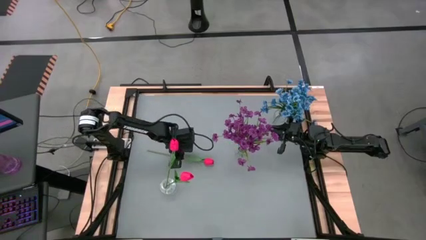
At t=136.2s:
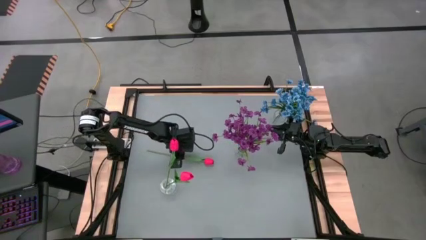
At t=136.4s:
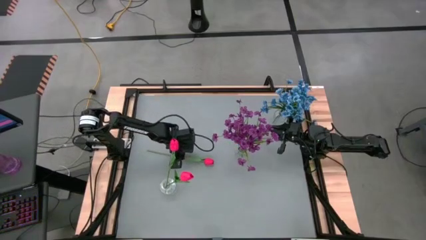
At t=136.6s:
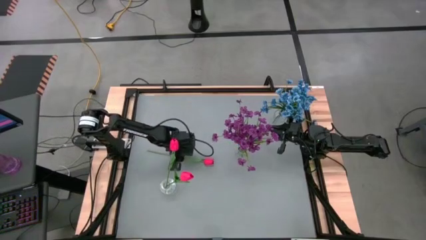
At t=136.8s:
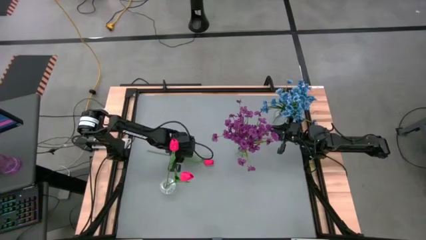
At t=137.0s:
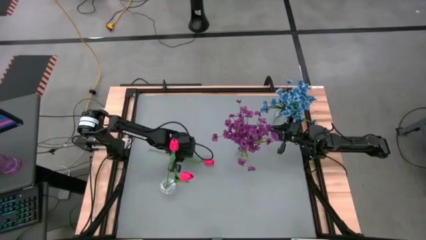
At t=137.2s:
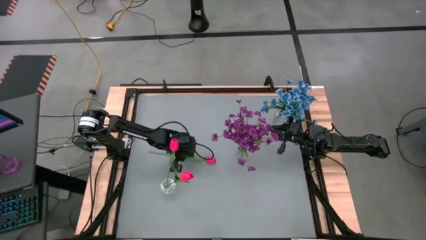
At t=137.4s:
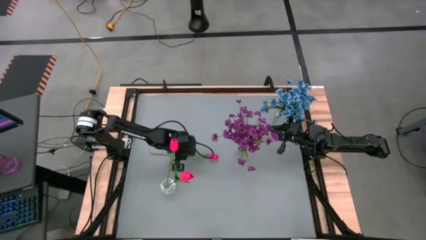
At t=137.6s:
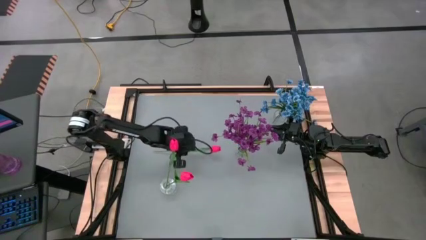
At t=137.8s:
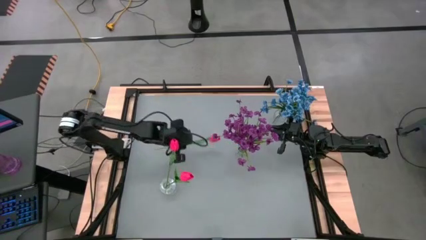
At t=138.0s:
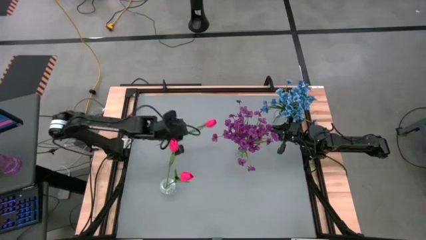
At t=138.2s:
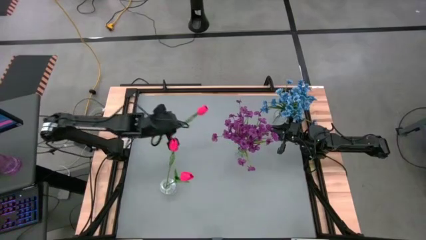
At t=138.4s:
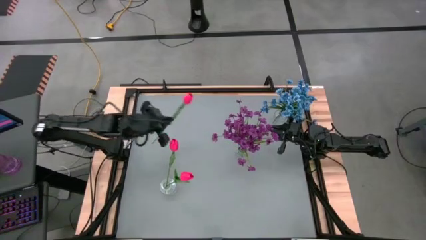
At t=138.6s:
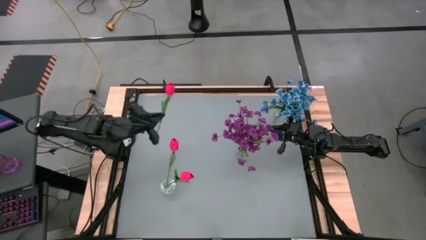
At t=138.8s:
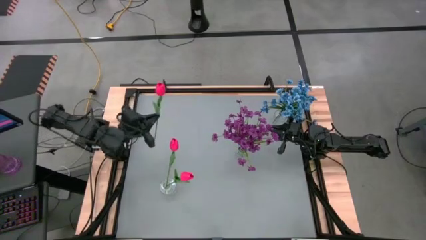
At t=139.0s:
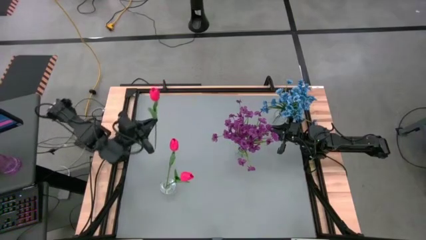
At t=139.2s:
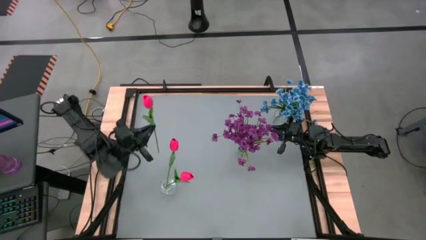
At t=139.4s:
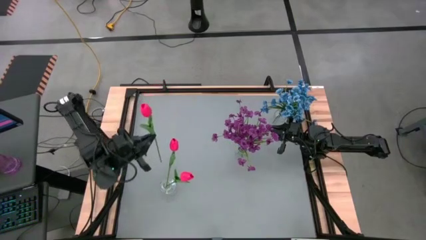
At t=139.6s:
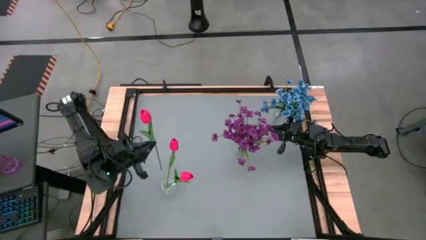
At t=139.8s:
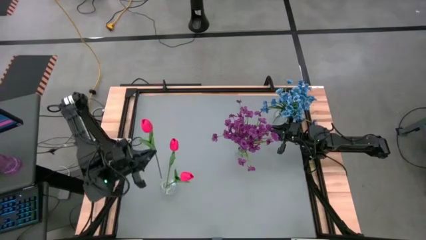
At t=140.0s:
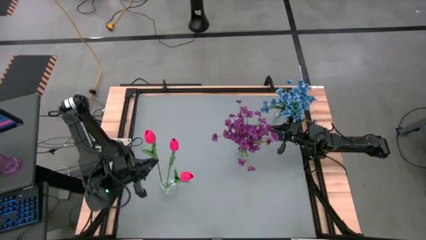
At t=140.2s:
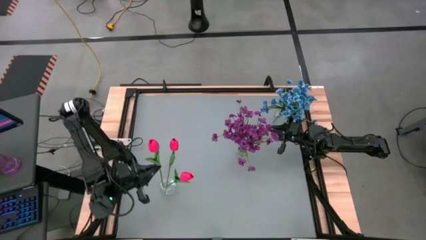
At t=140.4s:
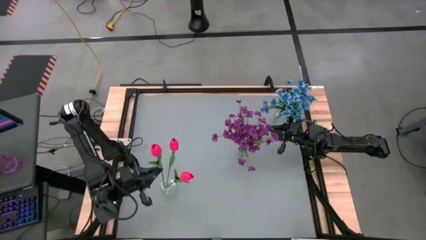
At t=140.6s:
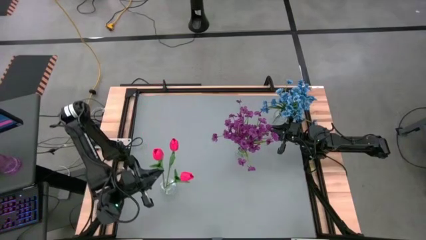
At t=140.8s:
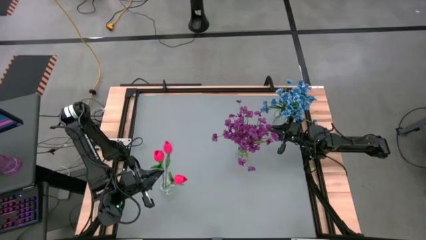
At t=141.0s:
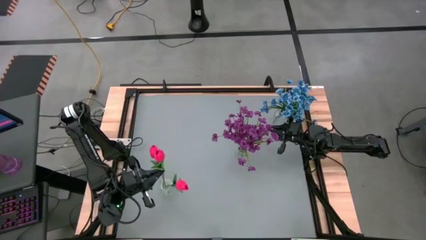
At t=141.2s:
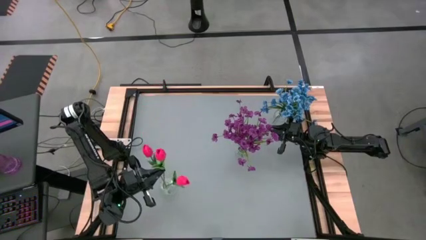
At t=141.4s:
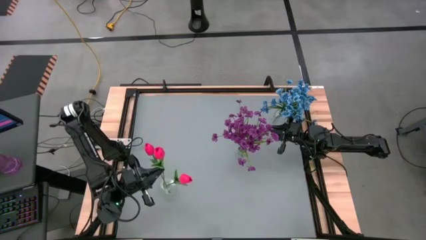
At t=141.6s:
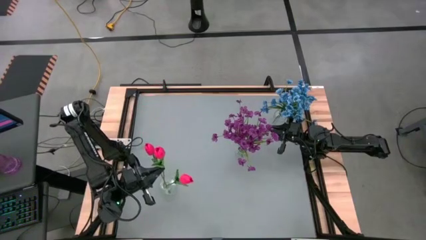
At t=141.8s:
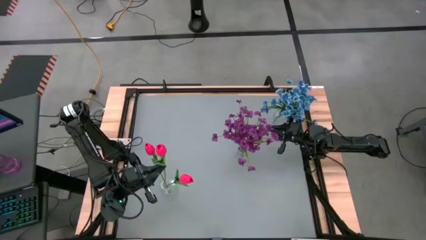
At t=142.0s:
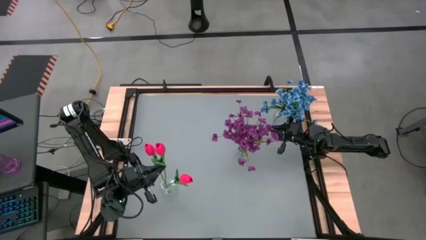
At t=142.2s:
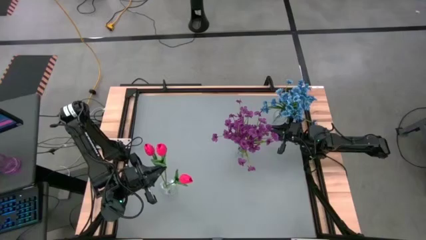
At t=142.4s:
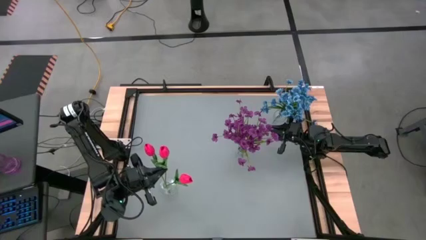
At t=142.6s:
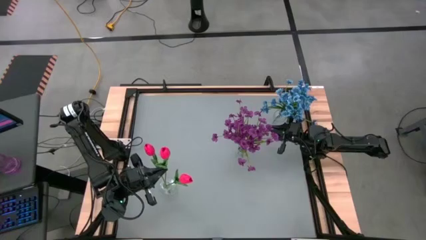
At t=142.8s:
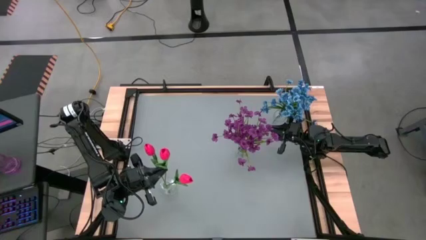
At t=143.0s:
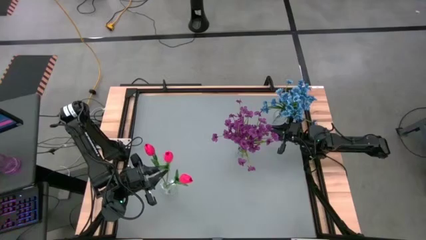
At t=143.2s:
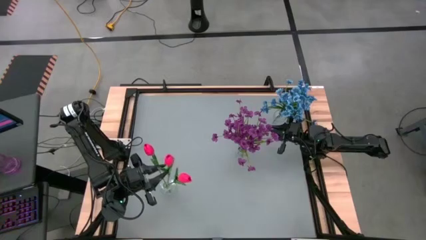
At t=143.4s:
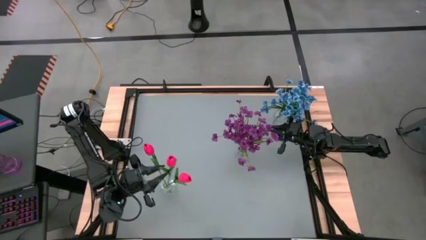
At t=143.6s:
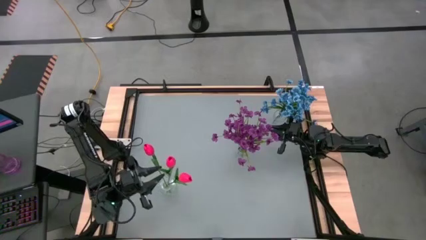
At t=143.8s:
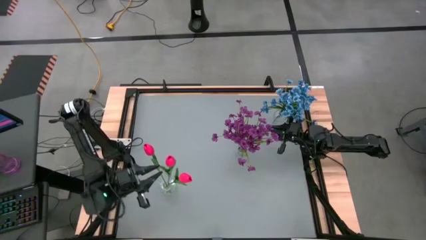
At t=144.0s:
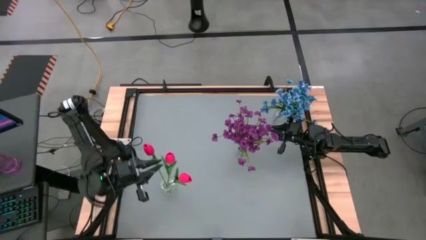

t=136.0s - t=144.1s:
Task: Sort flowers into vase by color
Put the pink tulip into the bottom transparent vase

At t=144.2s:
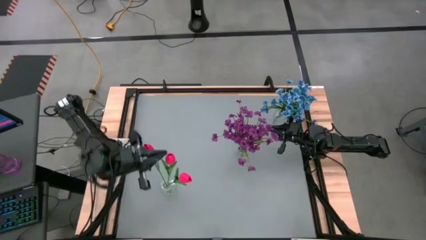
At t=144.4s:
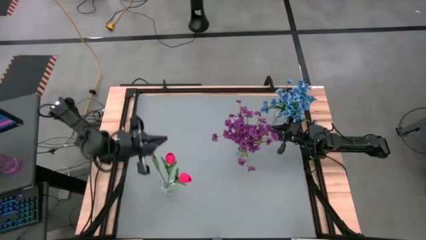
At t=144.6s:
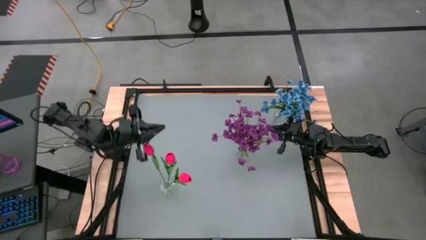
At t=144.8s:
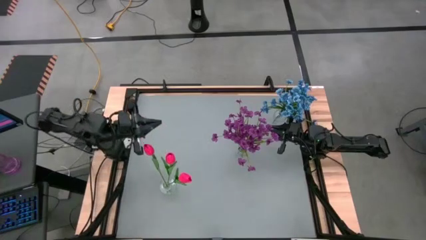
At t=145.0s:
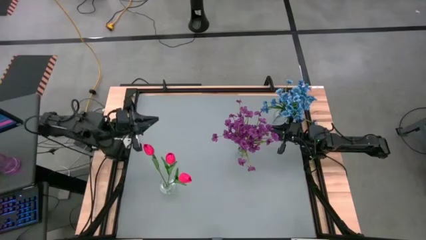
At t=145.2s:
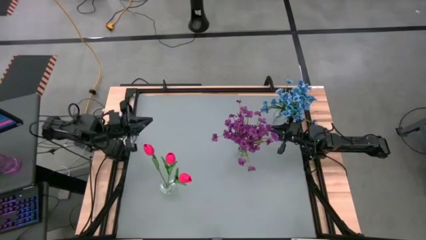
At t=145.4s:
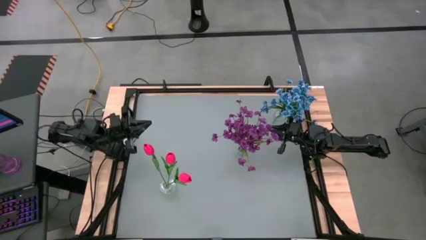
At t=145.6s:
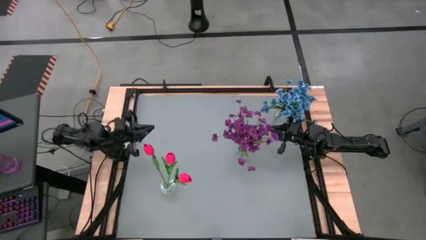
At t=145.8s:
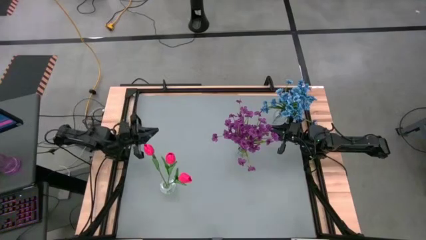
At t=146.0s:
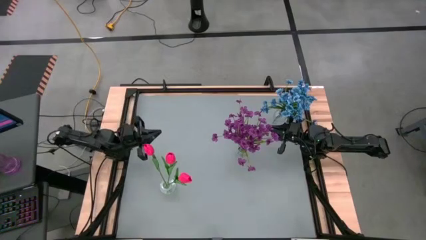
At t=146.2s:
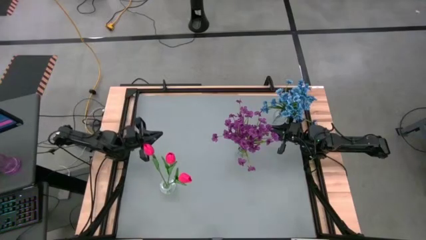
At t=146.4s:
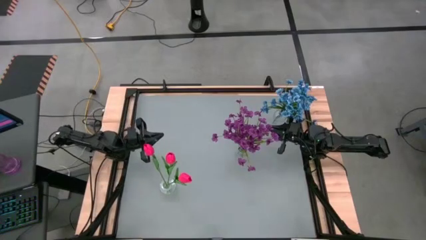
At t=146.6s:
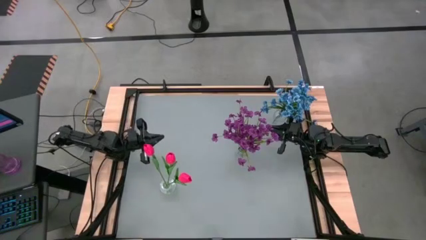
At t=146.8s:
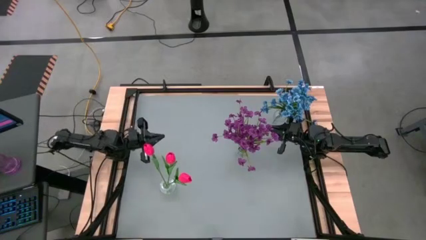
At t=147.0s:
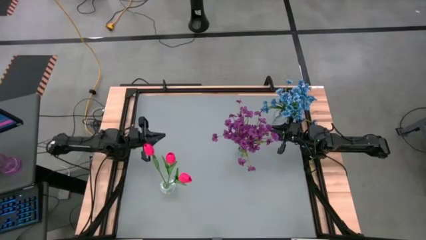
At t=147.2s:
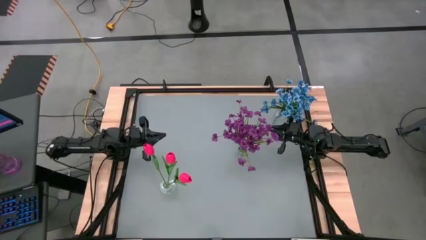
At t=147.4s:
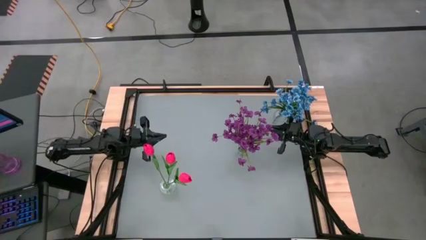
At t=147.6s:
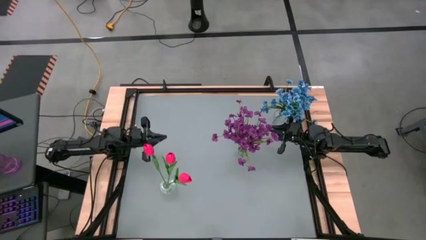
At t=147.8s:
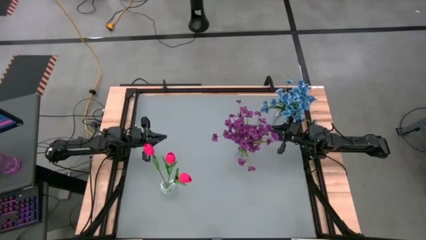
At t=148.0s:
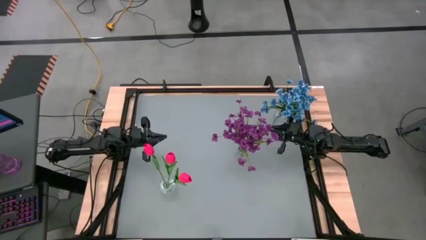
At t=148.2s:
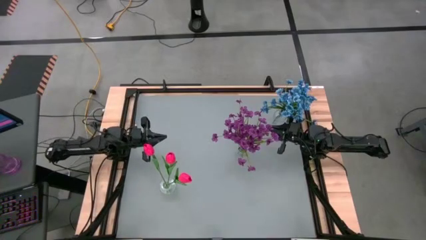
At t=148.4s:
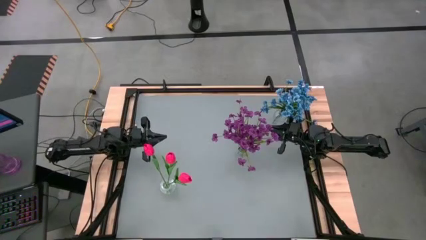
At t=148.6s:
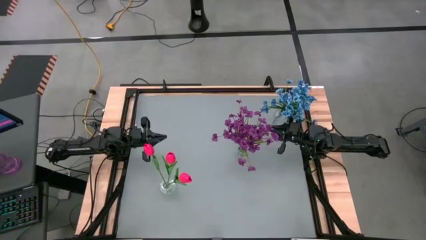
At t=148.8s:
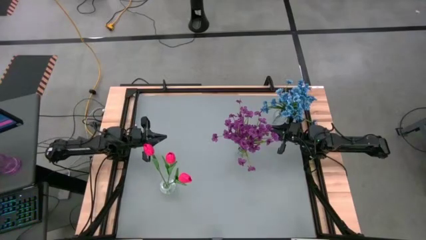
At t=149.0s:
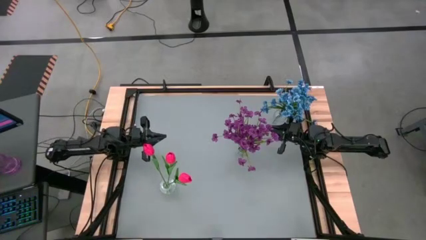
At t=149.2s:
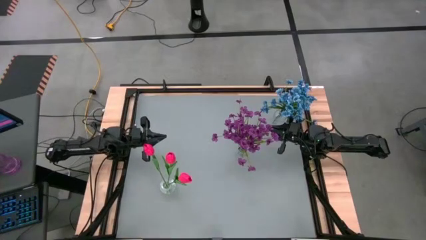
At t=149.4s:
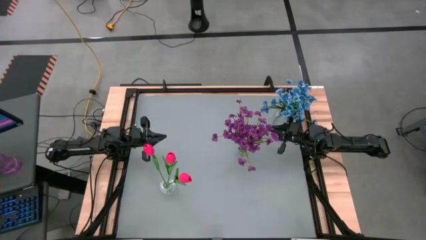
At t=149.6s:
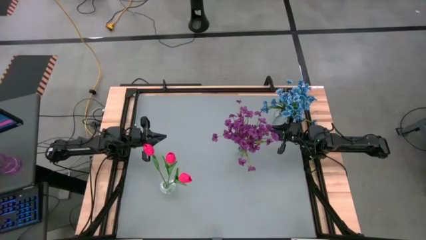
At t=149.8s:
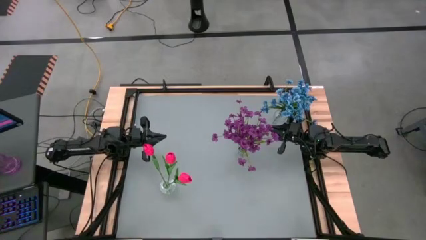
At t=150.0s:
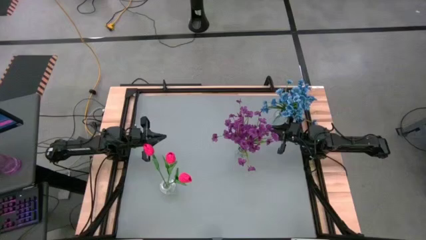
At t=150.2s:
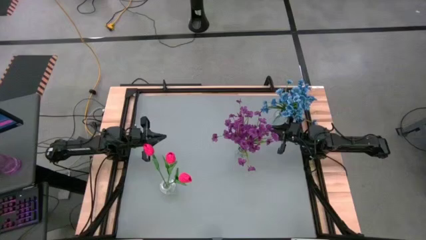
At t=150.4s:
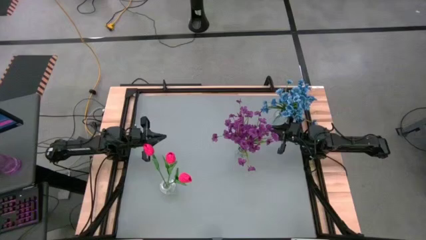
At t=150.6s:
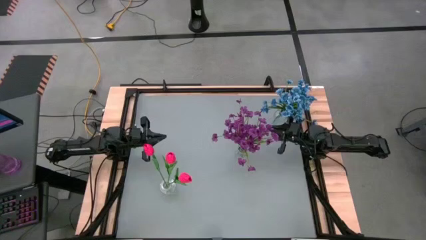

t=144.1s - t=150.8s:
Return to Home Position
